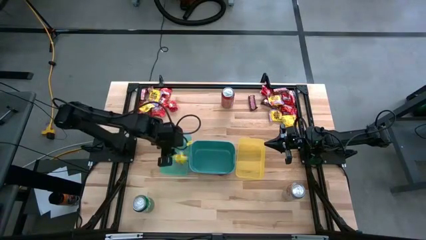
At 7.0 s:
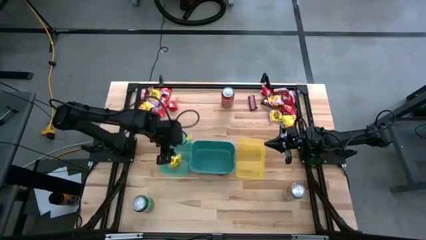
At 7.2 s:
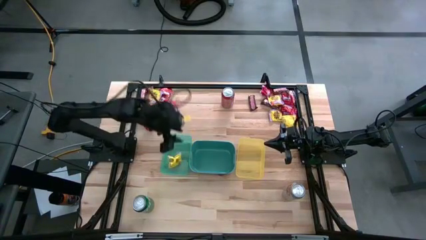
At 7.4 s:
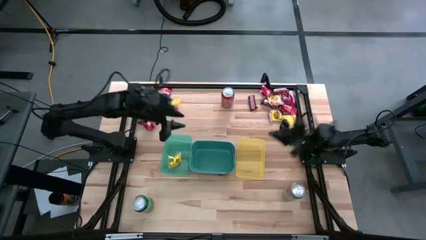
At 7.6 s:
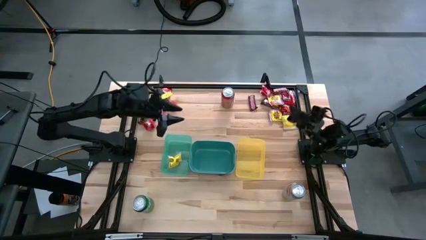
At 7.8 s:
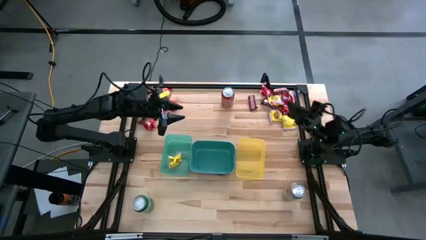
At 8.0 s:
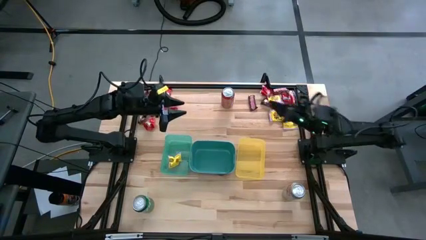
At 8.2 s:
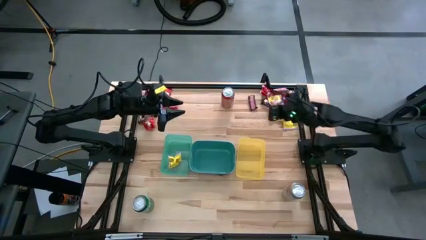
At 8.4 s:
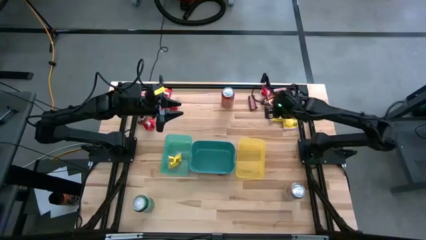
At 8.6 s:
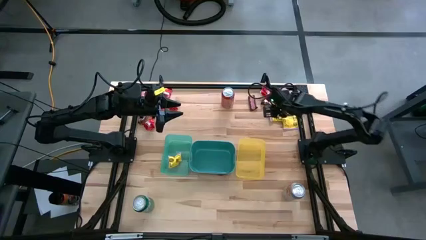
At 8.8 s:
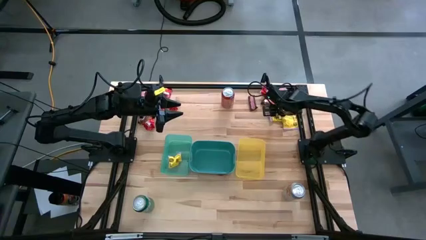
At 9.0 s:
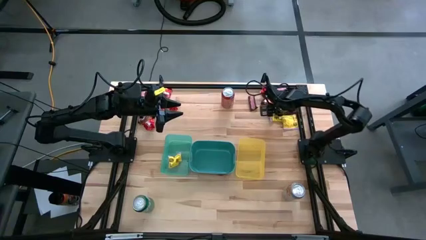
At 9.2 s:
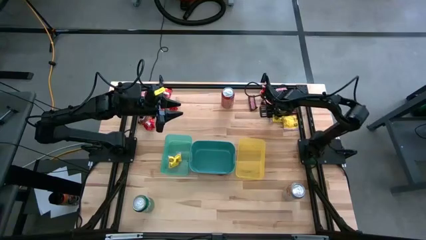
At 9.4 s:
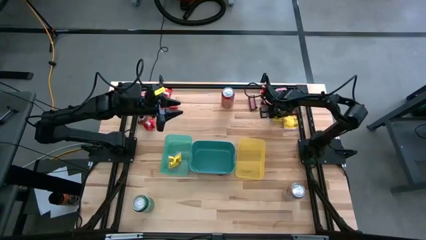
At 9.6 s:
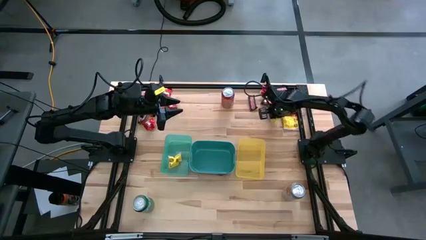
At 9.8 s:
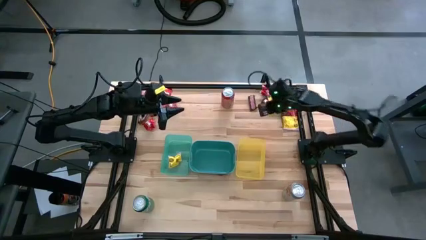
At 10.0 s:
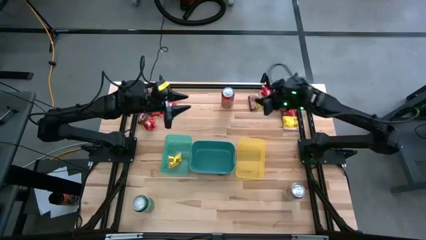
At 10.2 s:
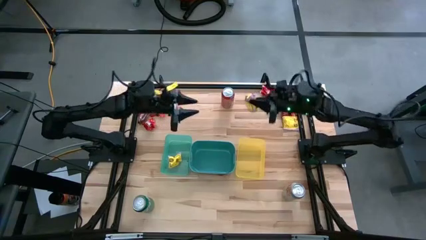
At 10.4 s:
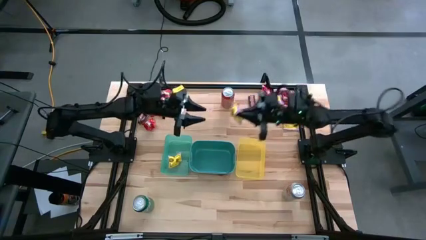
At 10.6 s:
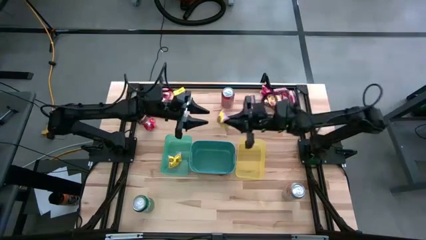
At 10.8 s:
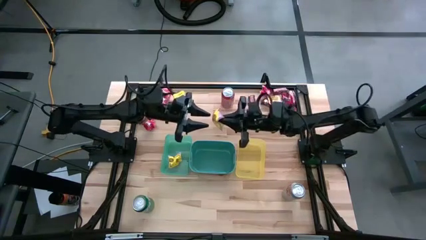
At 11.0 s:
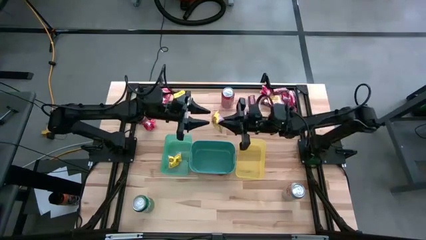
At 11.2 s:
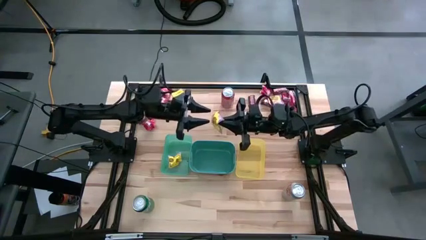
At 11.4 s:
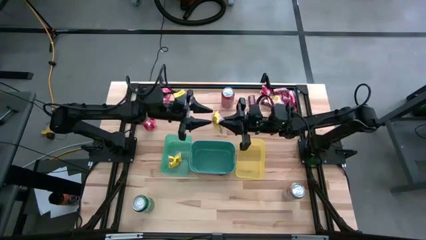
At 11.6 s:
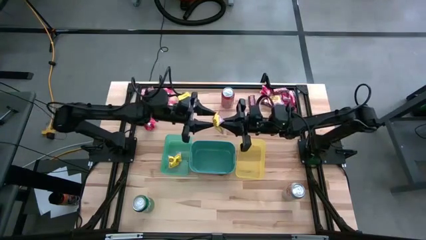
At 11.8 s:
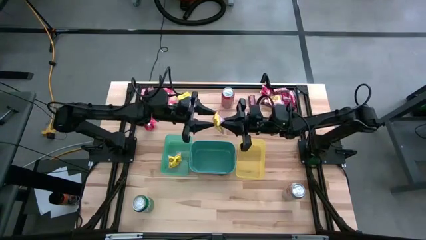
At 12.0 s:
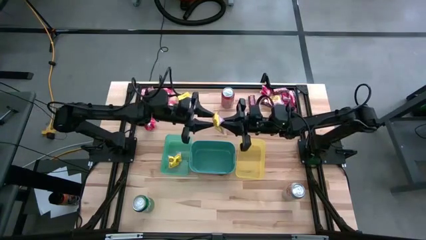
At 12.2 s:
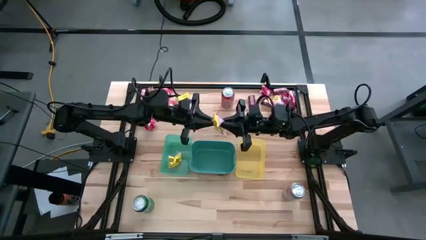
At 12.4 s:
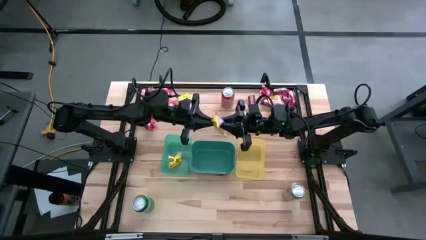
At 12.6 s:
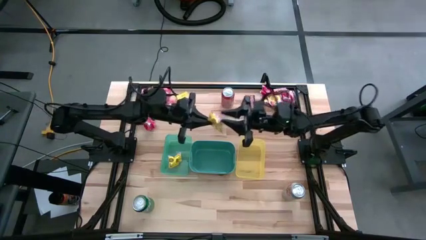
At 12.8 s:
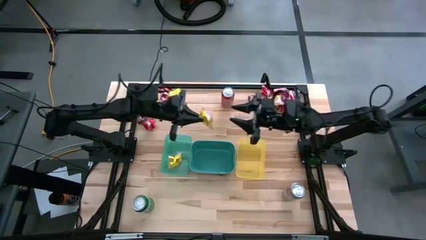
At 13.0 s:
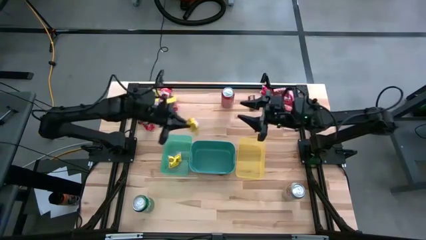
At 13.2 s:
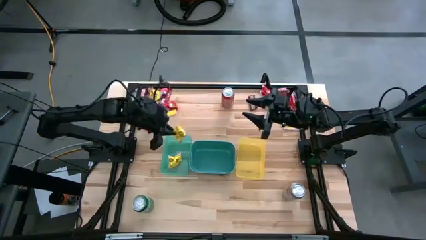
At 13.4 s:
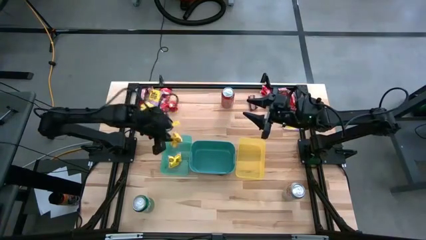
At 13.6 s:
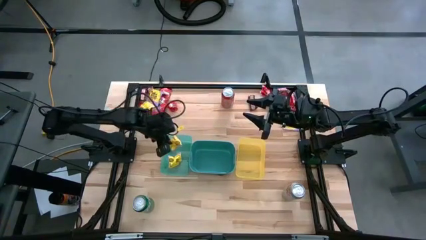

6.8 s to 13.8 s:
Task: Sort candy
Put the yellow candy into the light green bin

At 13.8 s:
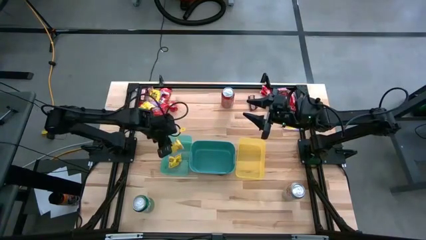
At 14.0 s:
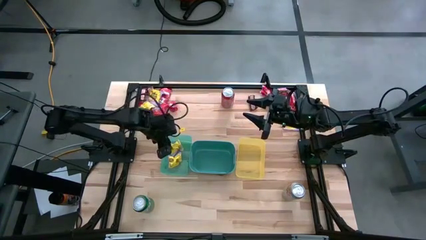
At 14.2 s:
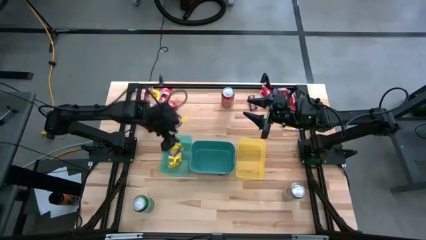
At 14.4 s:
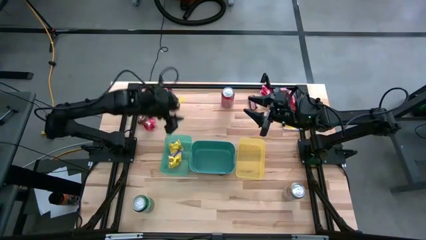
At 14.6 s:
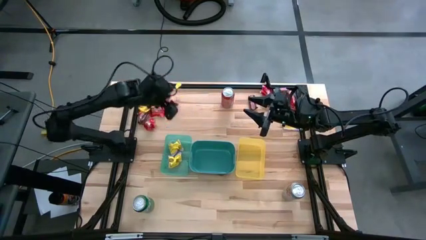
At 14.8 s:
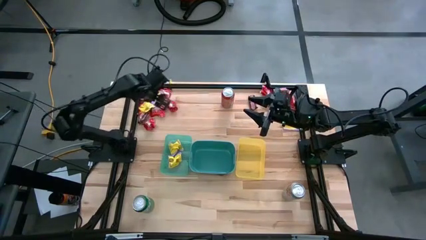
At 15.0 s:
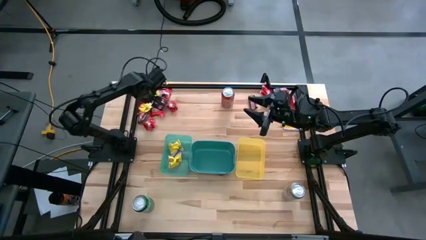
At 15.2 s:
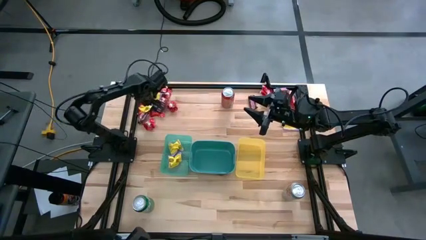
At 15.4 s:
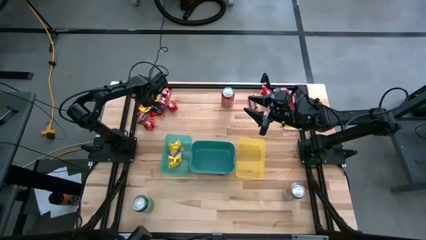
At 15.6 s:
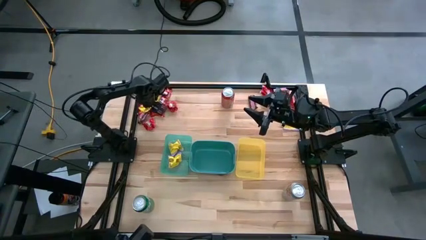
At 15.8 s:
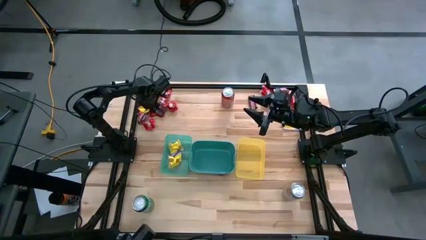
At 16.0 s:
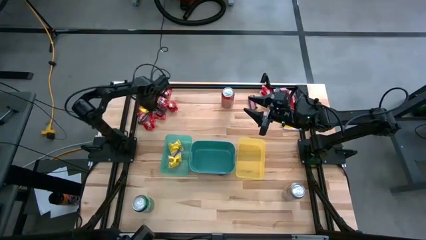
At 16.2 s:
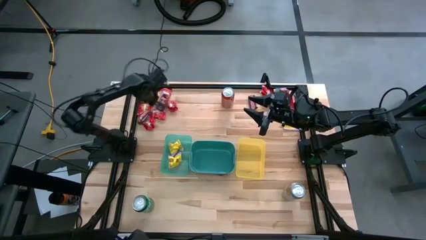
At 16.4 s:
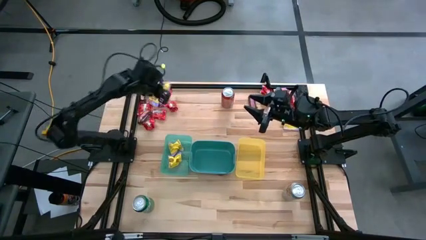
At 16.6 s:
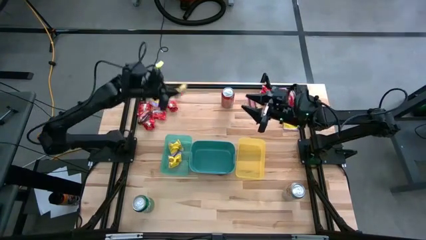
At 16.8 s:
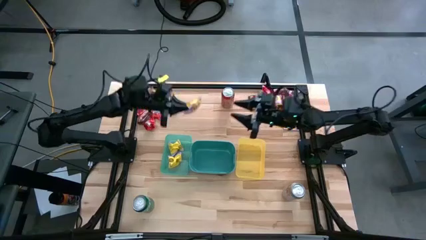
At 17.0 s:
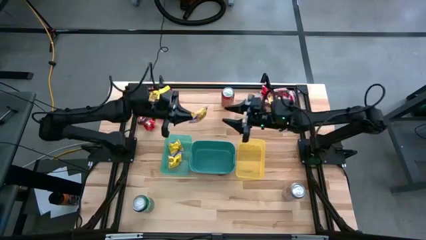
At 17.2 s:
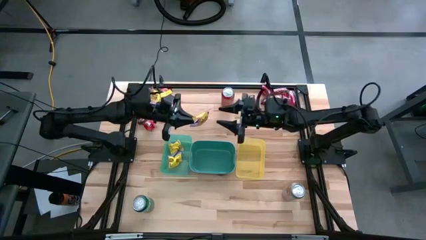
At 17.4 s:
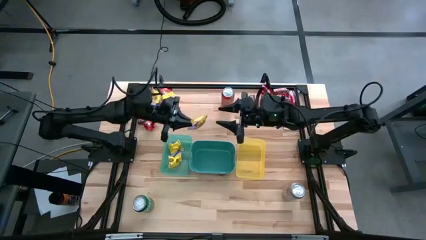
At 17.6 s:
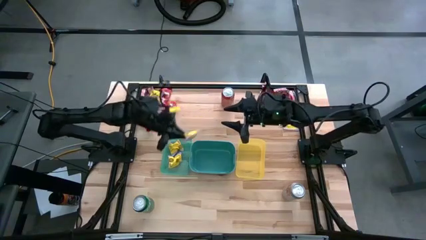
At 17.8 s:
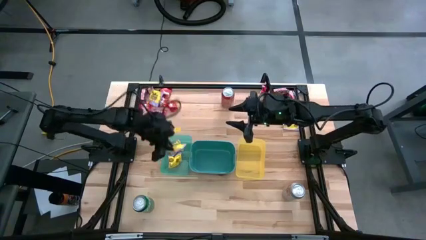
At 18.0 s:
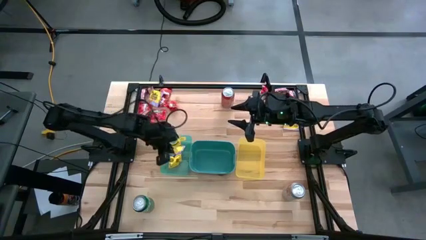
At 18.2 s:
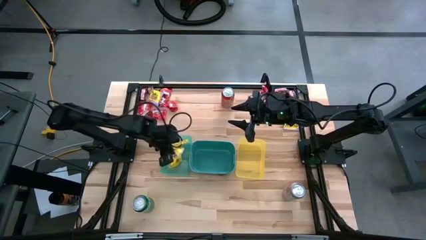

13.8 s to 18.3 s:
Put the yellow candy into the light green bin

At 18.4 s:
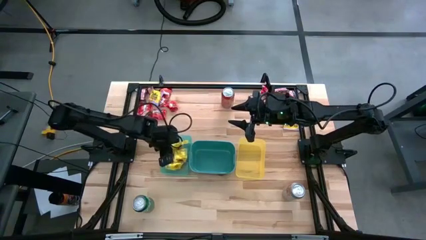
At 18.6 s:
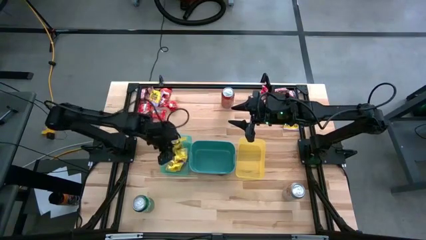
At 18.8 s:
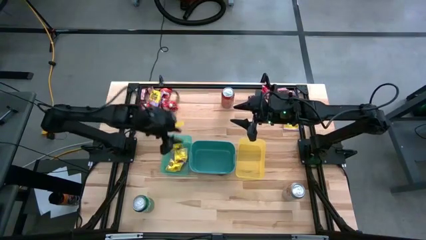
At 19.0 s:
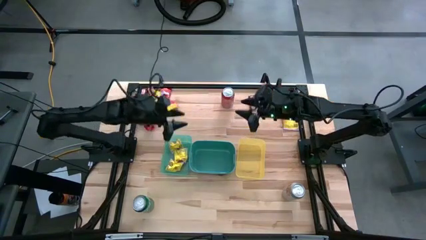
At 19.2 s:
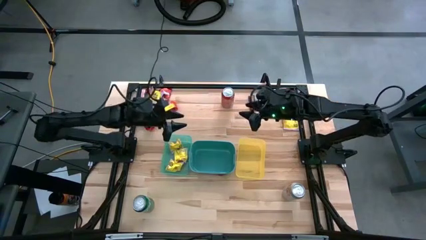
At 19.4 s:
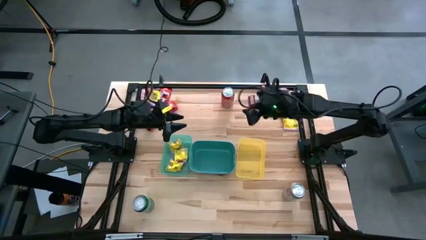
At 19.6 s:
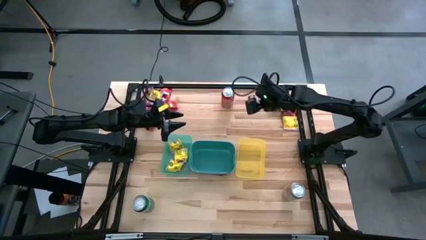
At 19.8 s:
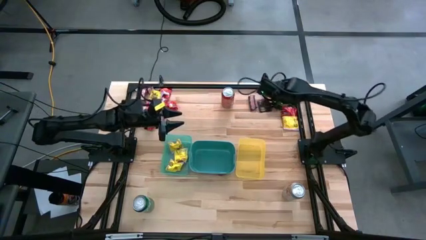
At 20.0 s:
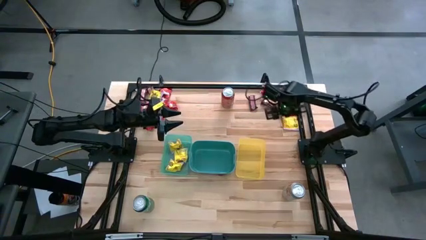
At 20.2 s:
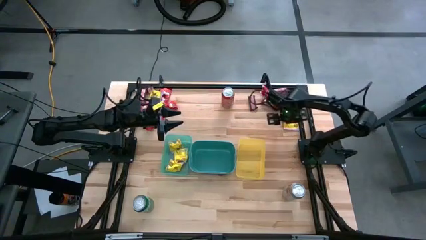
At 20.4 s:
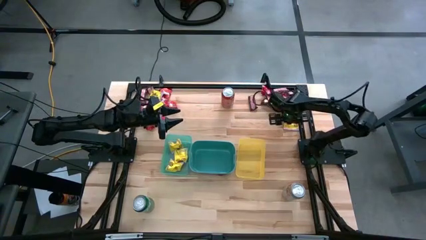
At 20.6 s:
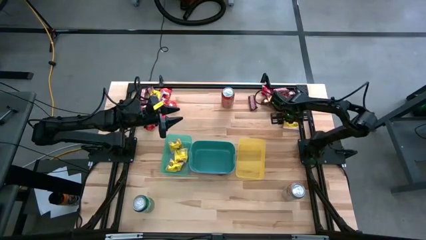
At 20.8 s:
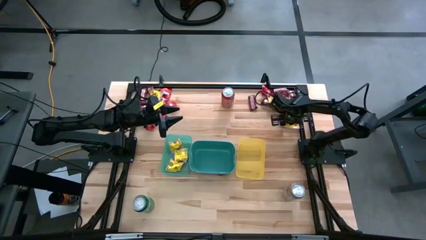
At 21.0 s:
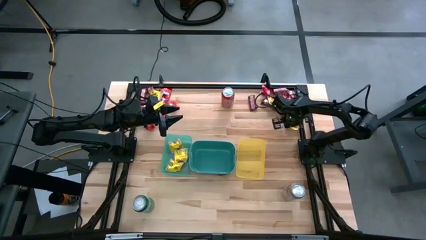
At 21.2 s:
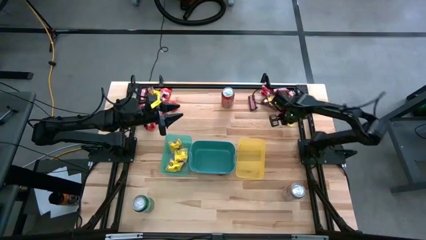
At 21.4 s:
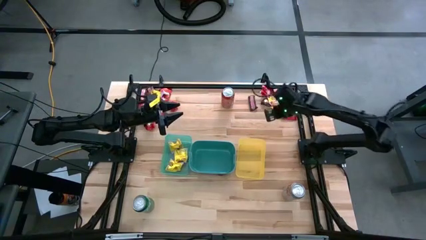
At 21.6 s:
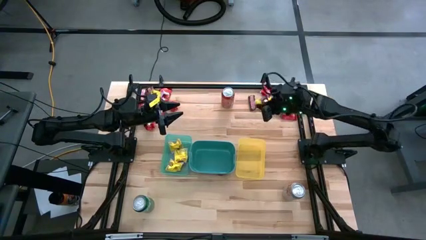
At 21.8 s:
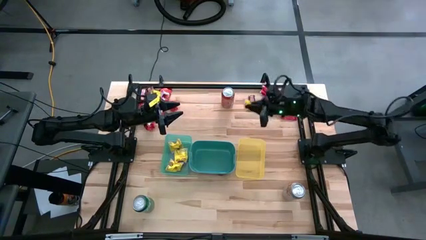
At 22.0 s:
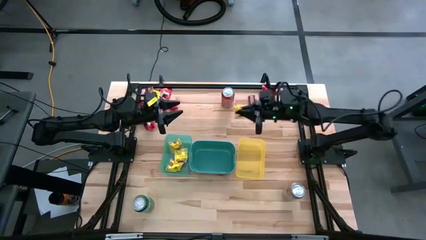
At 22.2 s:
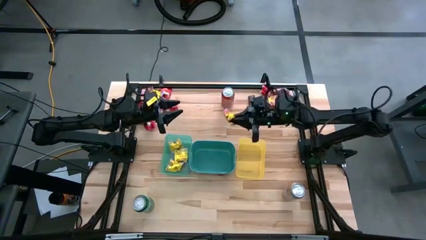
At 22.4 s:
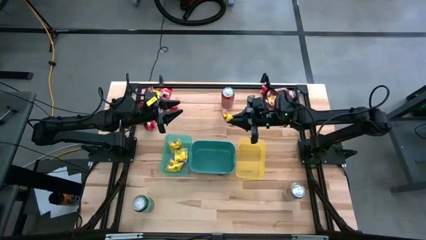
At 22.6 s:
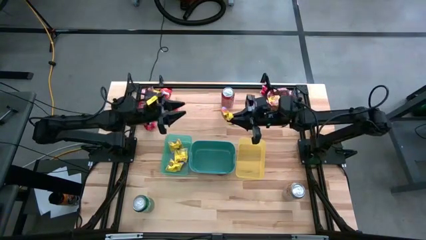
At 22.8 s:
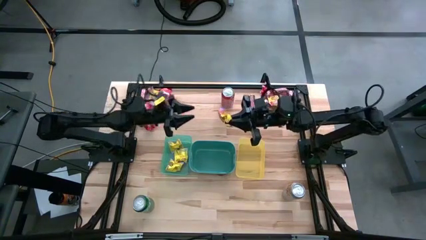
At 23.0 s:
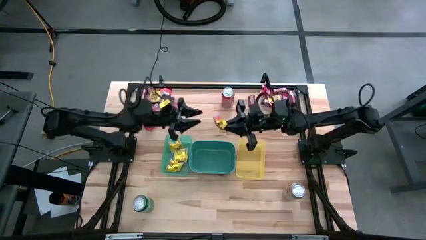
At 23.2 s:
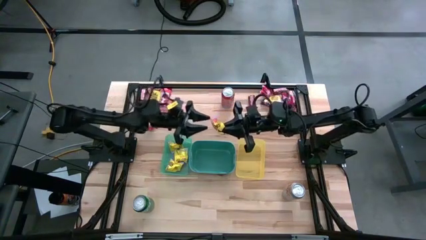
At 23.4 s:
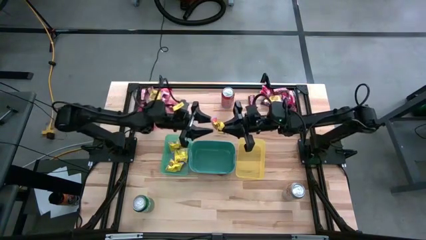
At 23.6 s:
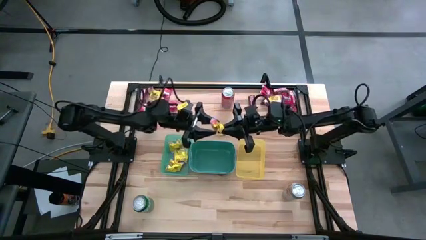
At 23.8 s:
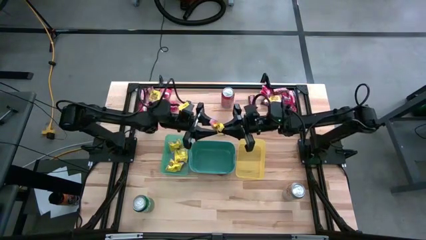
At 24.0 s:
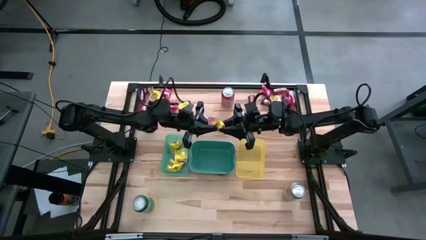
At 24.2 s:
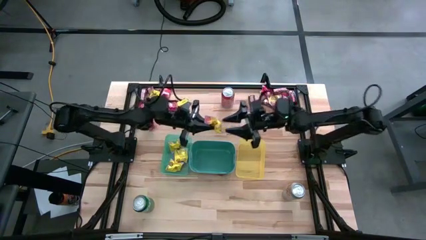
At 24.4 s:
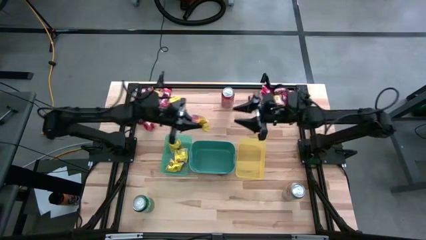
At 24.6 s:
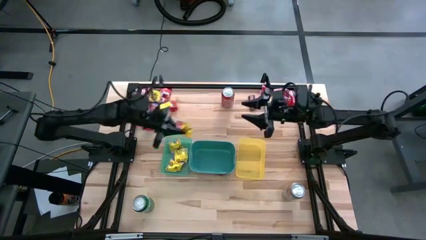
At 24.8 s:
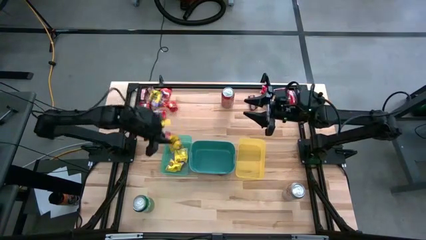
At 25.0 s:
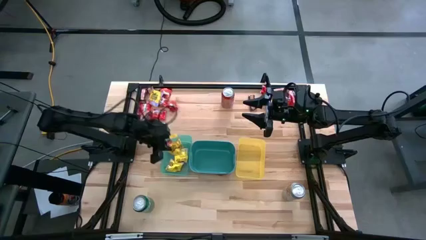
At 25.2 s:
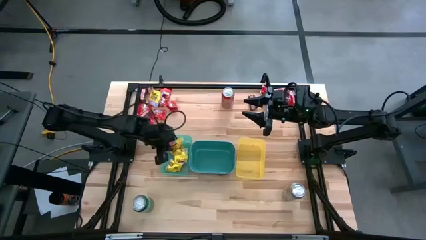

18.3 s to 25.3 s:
Put the yellow candy into the light green bin
